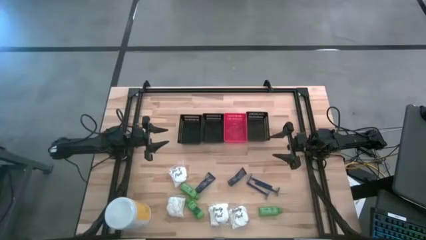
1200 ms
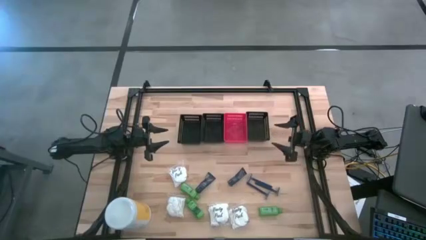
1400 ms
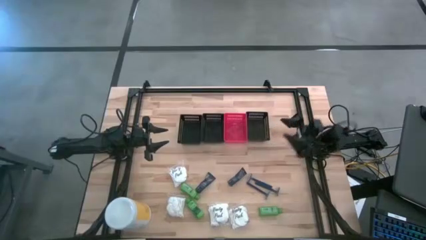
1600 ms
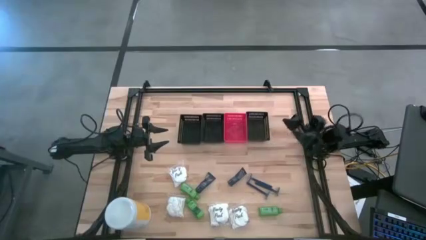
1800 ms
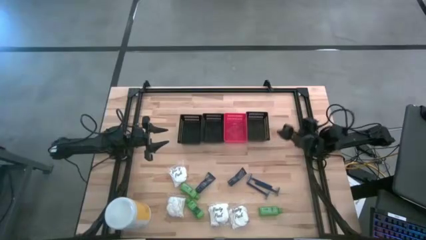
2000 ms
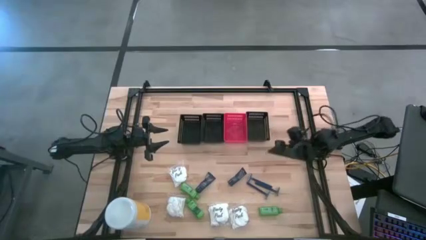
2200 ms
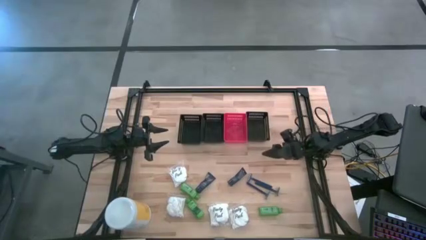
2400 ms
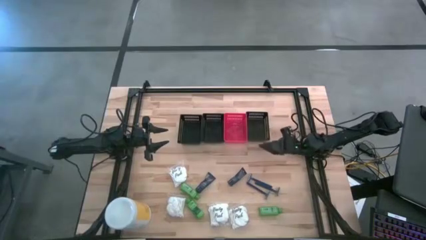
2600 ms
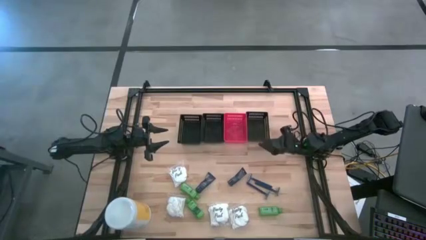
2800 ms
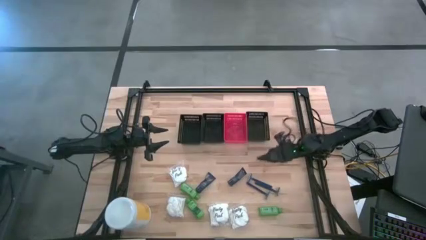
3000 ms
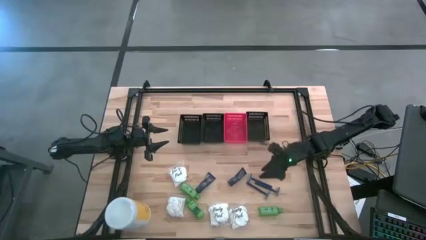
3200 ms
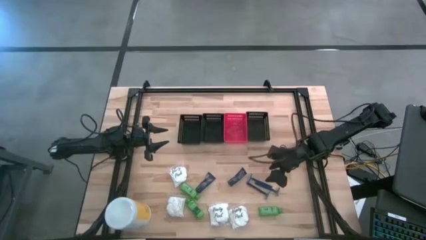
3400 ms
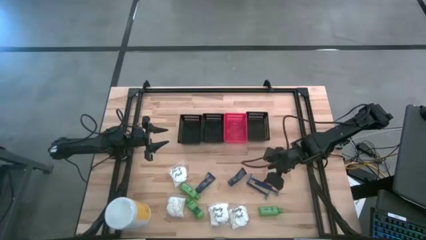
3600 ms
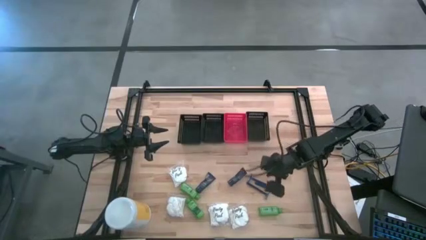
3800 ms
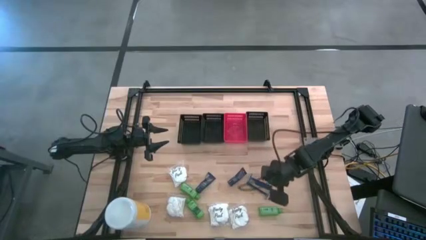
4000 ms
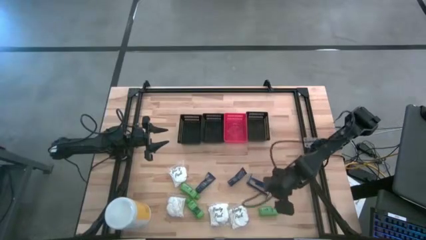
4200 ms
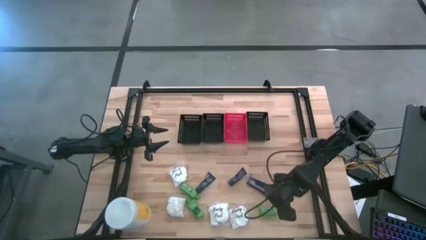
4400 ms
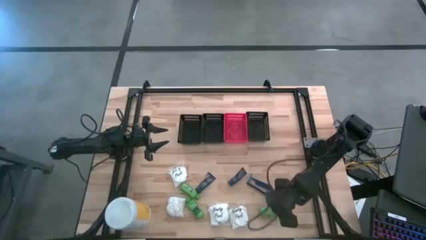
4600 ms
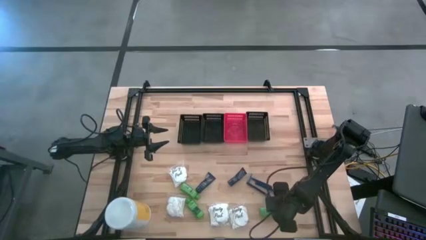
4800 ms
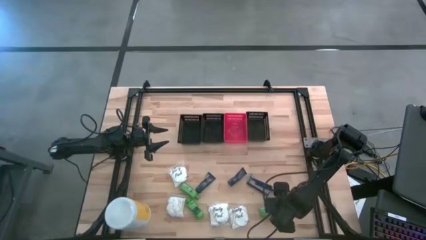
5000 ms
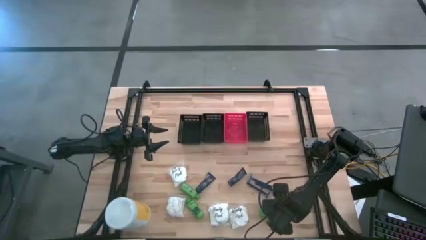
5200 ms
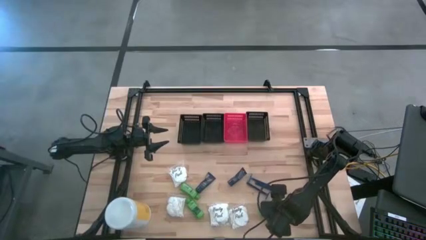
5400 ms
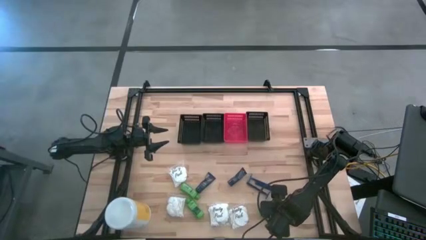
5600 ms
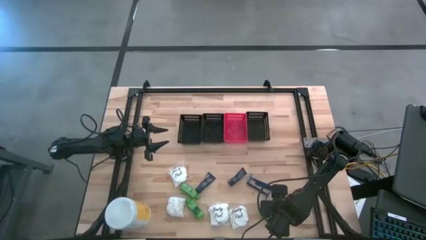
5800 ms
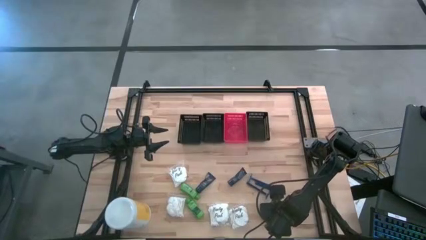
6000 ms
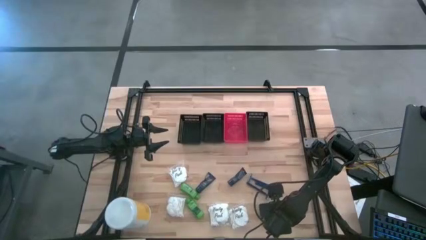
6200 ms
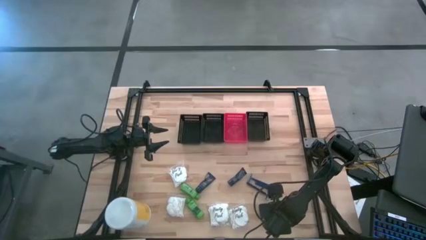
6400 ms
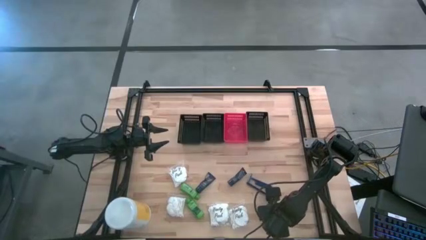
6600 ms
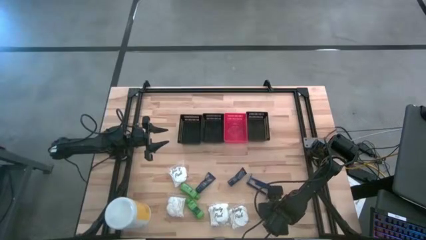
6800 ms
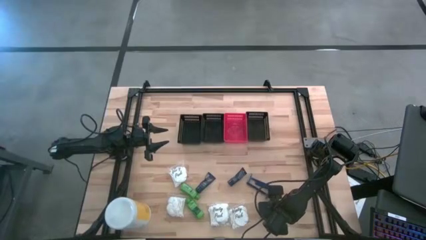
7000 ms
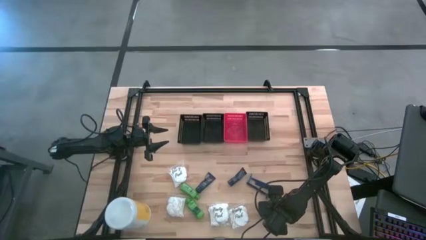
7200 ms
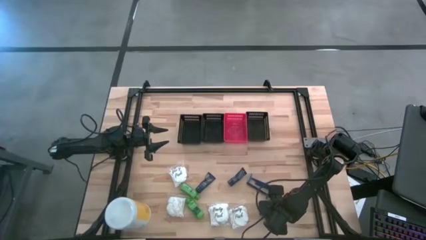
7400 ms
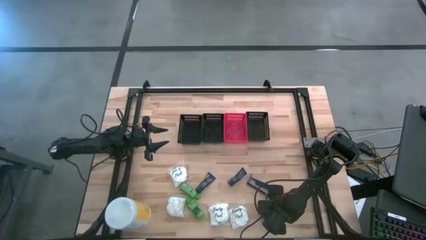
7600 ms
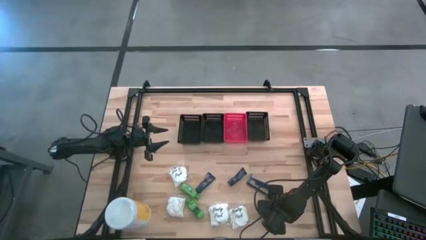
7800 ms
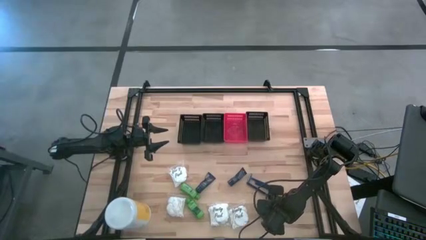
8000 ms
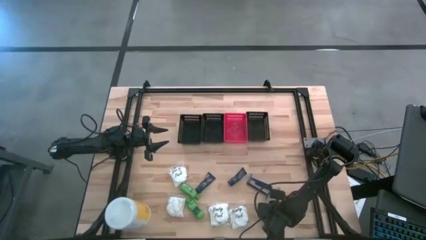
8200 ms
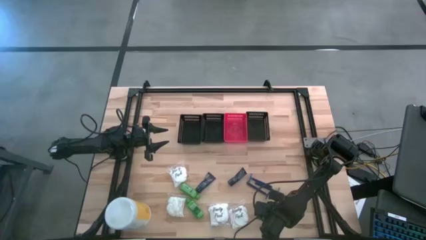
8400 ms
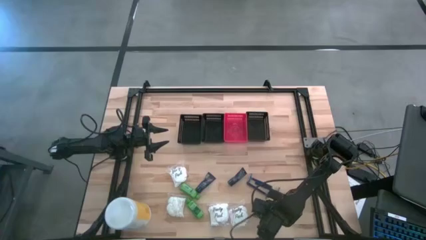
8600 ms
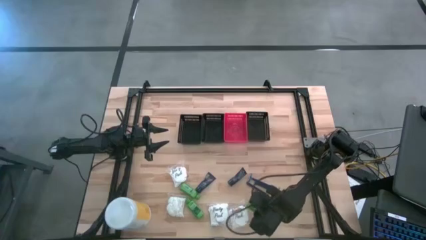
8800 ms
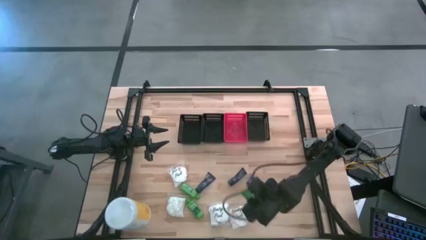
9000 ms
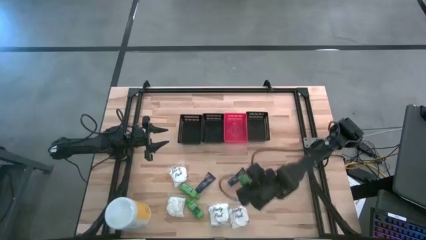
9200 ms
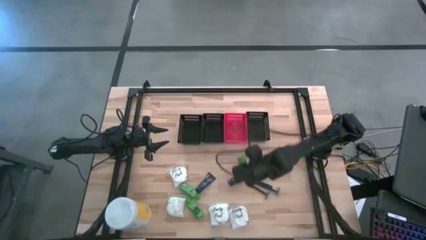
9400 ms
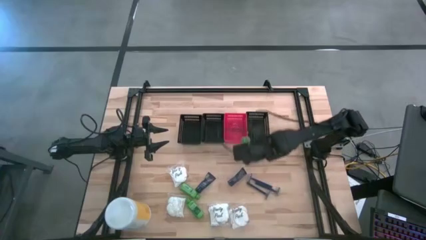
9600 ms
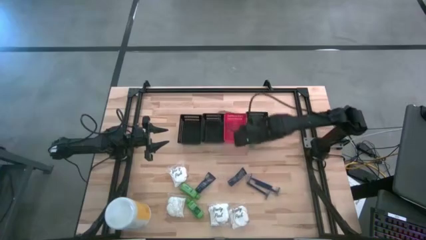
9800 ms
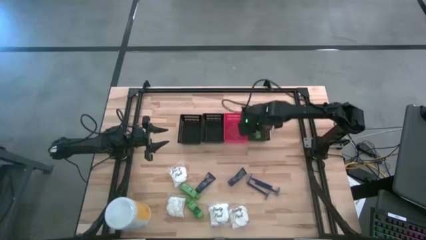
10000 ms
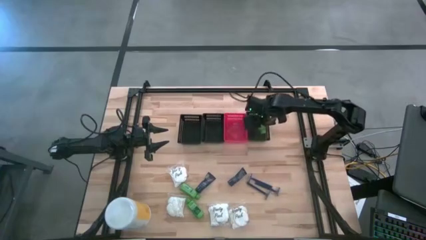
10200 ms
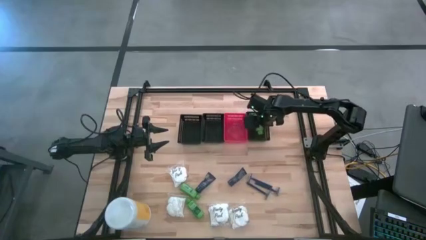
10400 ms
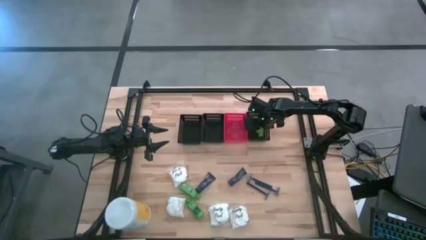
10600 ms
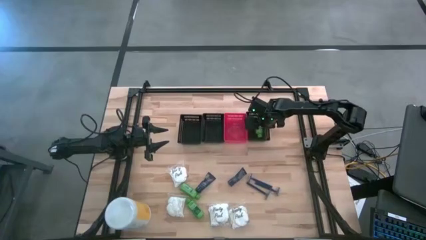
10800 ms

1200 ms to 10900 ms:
Task: Pick & Place Travel size toiletries
Put the shampoo into the right black bin

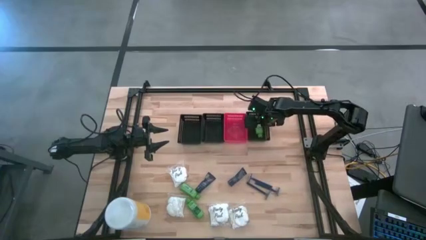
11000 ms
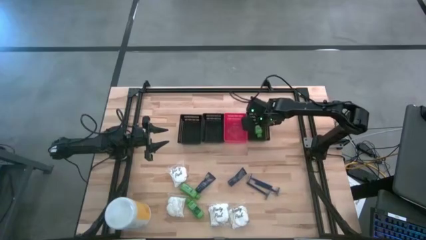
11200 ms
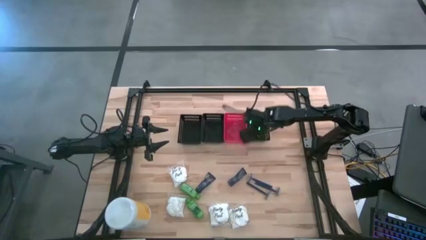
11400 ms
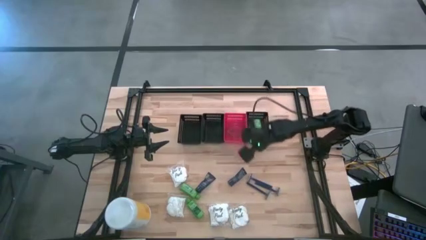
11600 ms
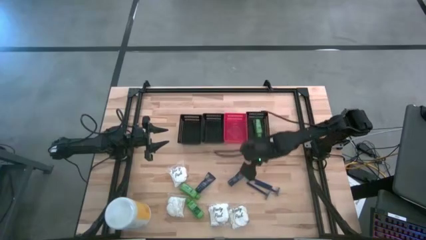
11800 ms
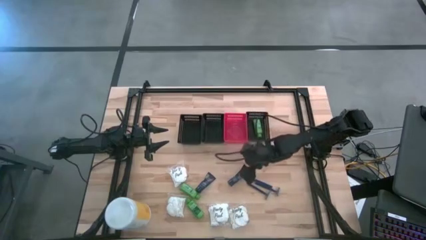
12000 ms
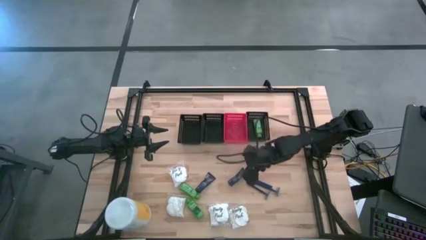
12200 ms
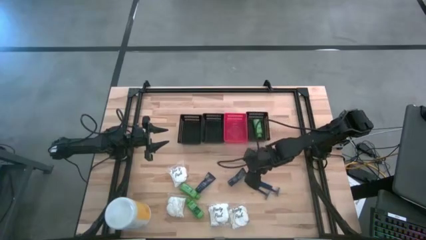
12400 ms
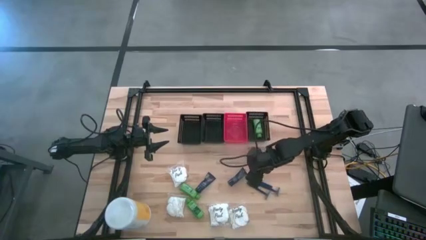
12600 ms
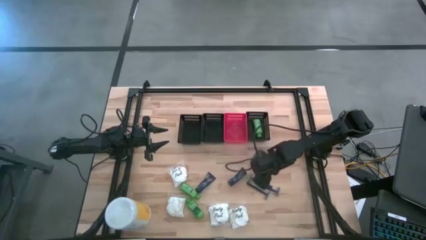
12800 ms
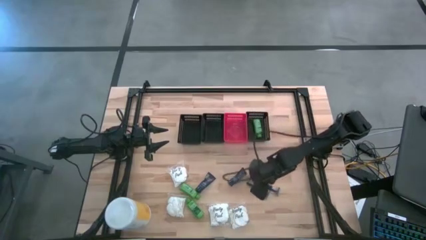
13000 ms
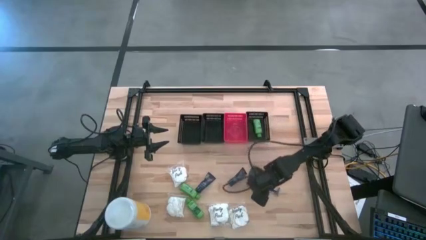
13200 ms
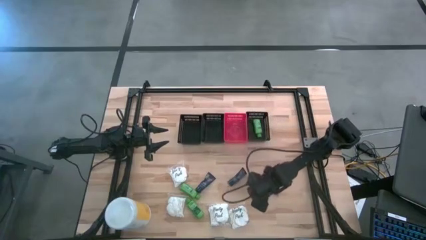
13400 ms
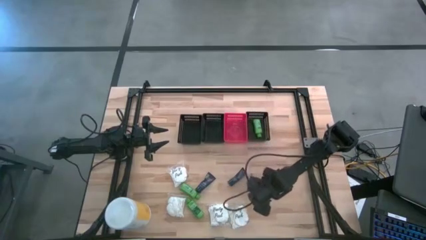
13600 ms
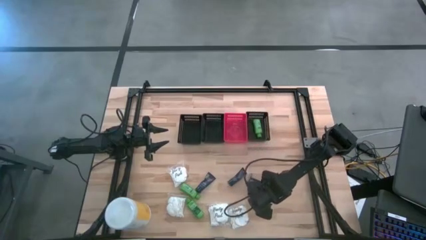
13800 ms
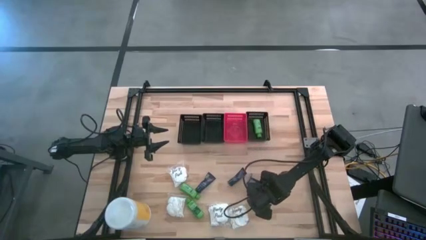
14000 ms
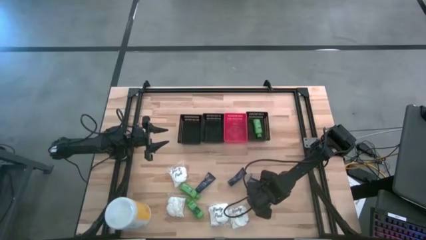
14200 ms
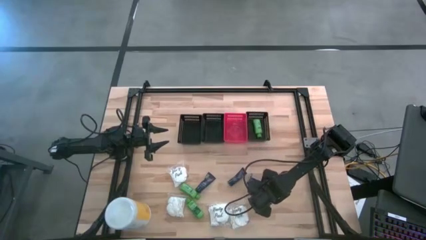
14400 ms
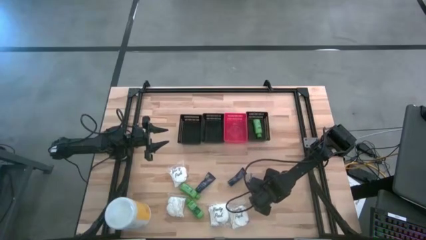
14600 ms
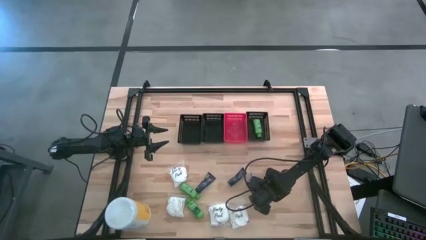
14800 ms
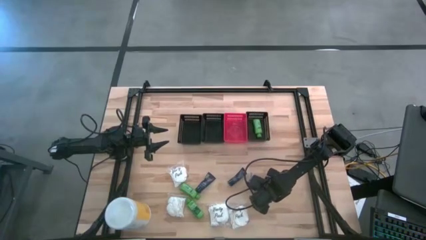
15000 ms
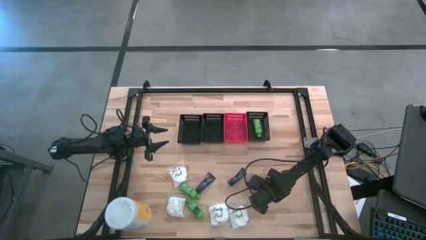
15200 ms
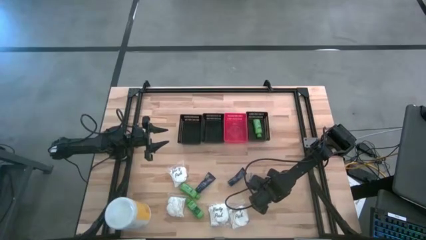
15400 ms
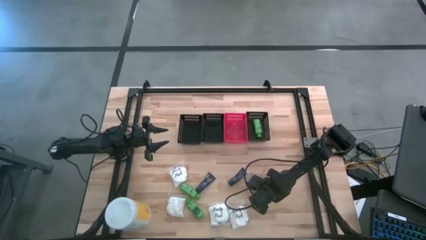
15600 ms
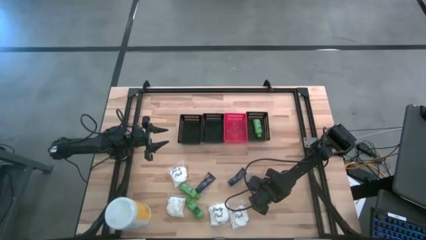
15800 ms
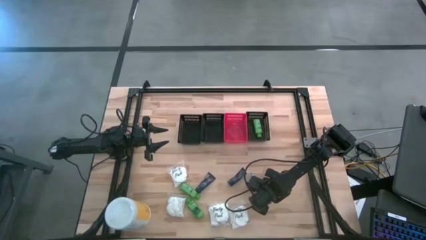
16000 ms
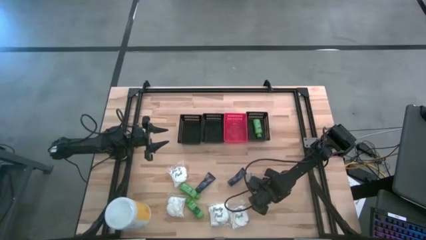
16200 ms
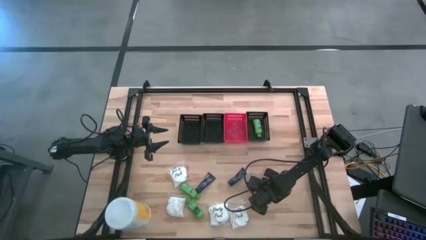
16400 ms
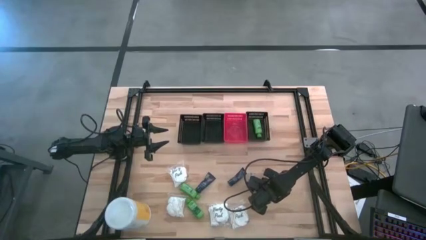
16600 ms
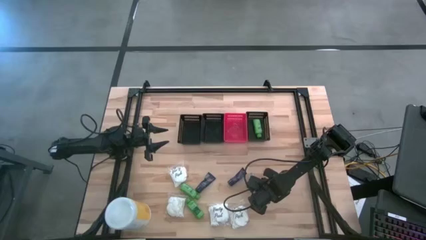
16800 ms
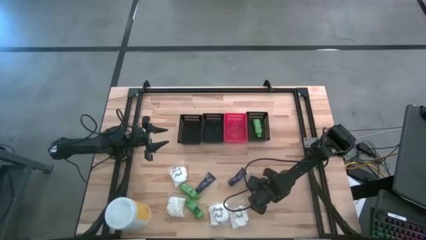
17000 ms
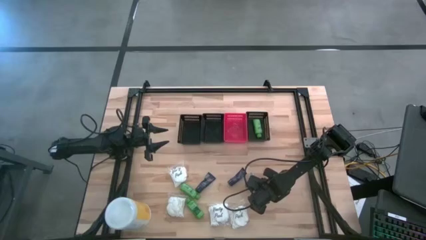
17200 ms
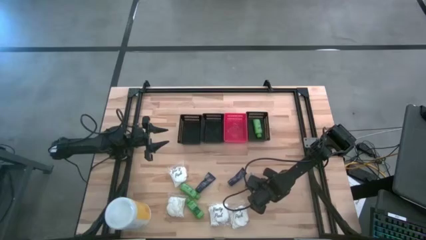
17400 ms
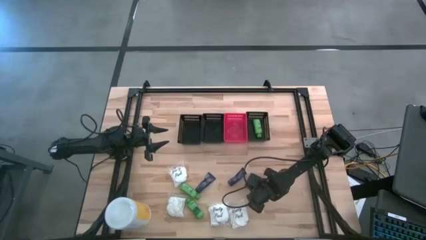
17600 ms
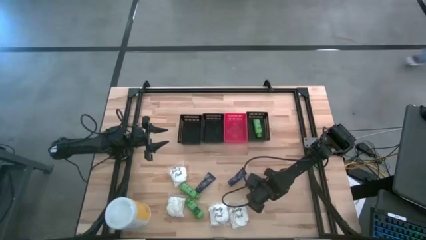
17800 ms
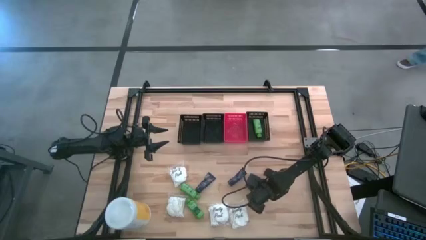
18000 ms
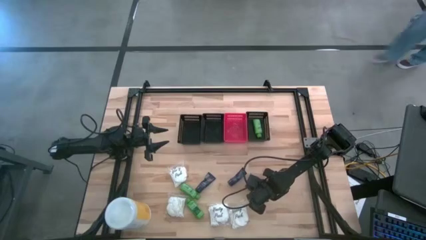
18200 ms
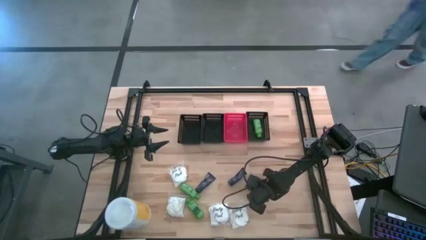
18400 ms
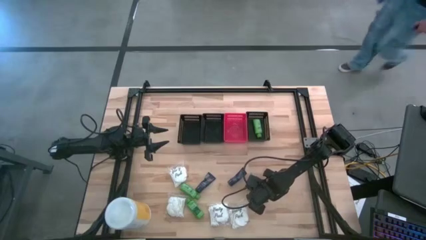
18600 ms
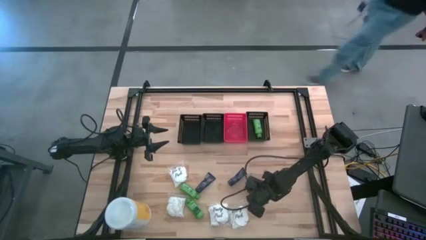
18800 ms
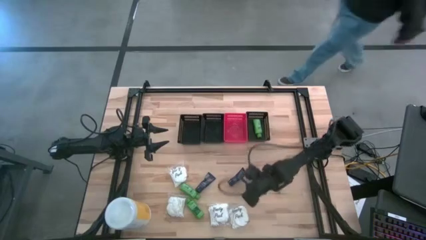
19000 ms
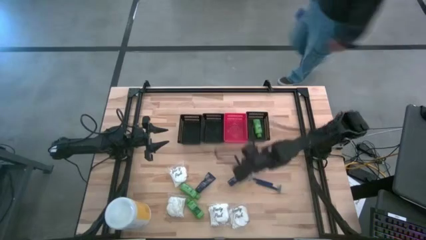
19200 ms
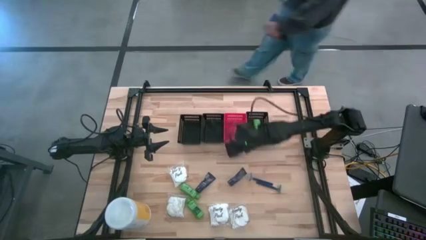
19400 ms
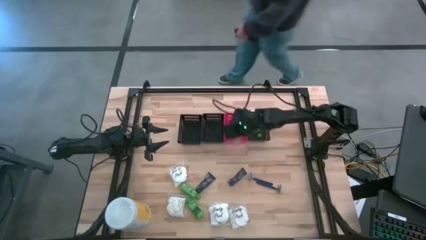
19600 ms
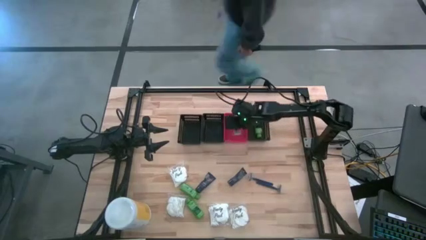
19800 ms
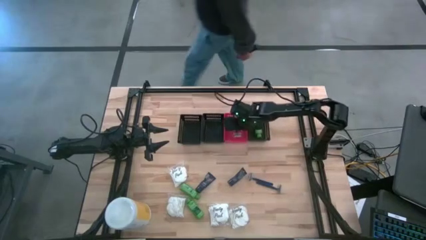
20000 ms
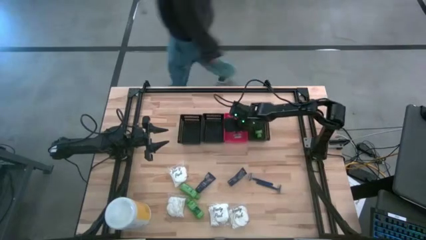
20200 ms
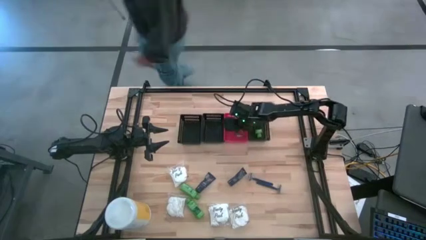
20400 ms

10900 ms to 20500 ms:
Put the razor into the red bin
